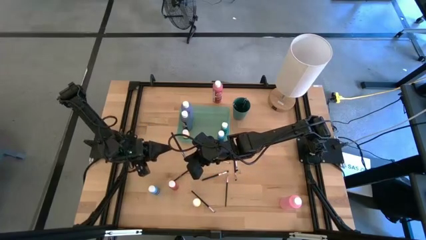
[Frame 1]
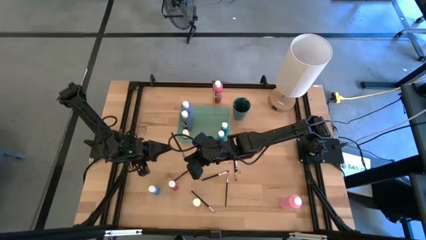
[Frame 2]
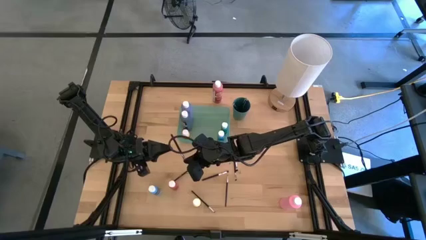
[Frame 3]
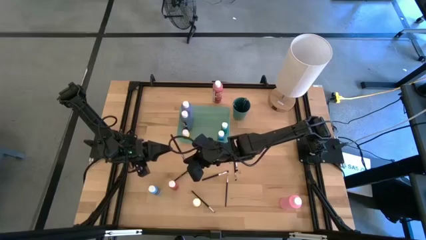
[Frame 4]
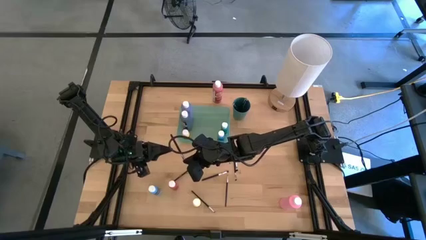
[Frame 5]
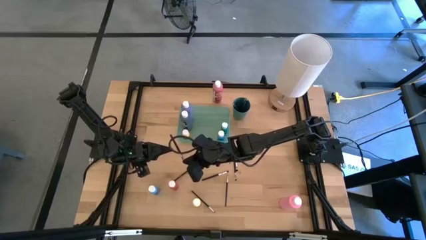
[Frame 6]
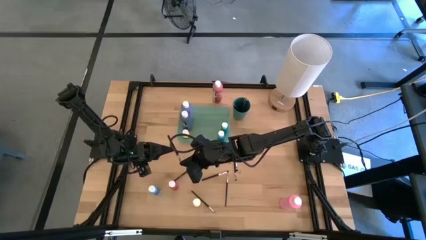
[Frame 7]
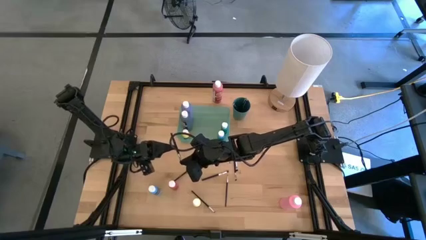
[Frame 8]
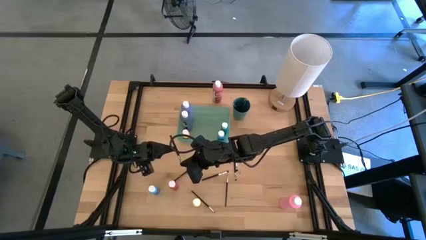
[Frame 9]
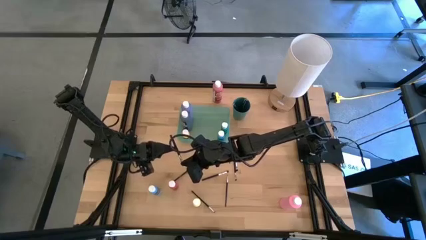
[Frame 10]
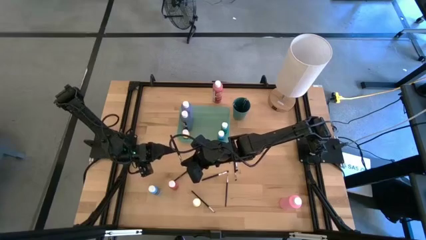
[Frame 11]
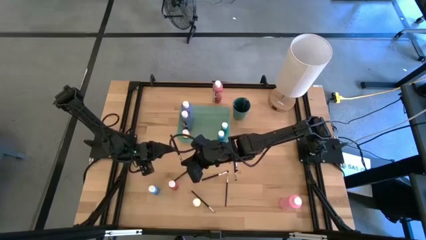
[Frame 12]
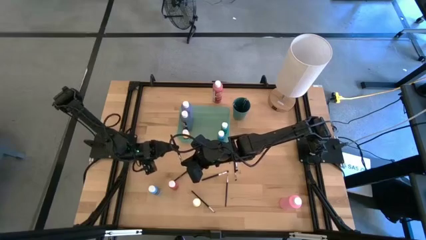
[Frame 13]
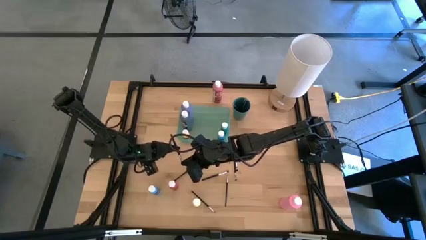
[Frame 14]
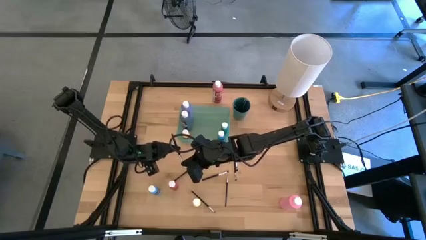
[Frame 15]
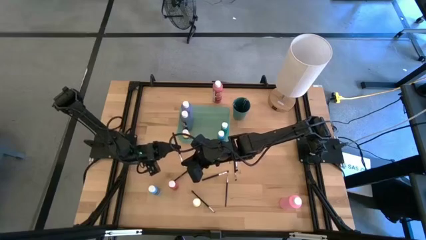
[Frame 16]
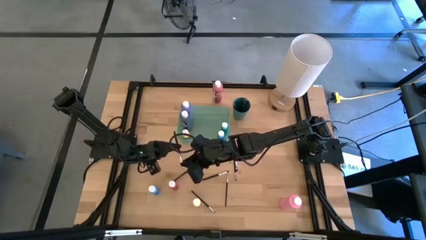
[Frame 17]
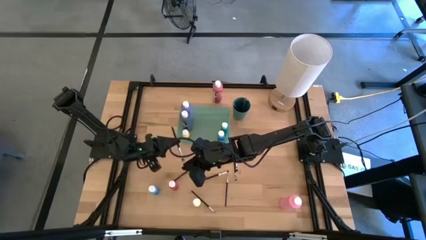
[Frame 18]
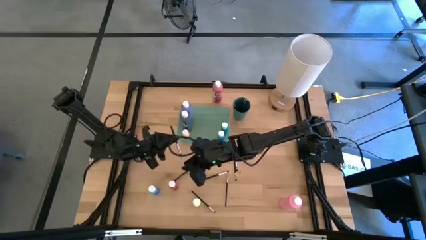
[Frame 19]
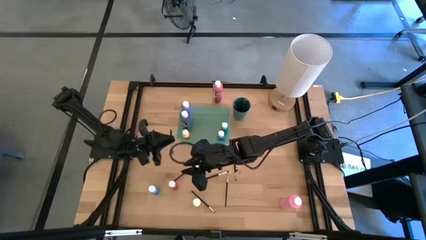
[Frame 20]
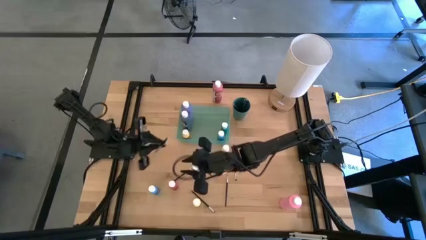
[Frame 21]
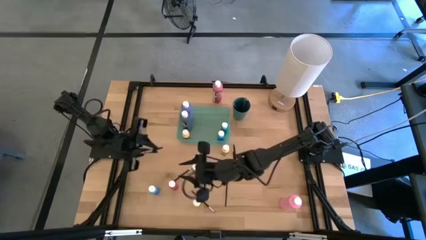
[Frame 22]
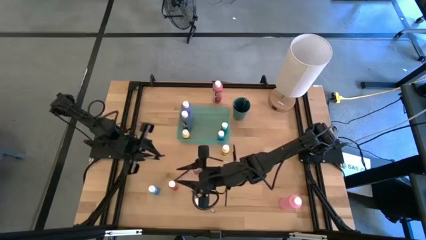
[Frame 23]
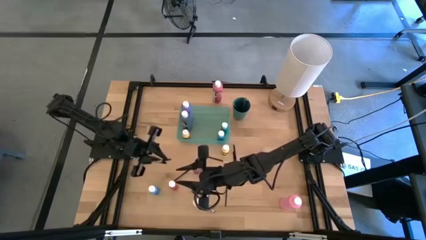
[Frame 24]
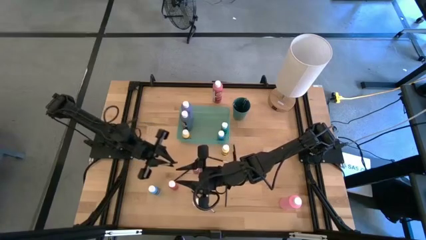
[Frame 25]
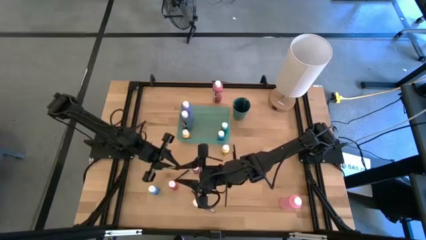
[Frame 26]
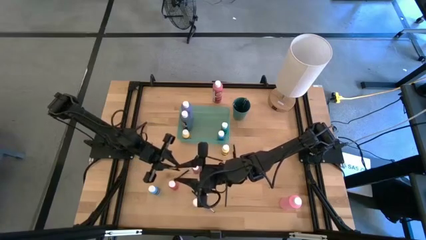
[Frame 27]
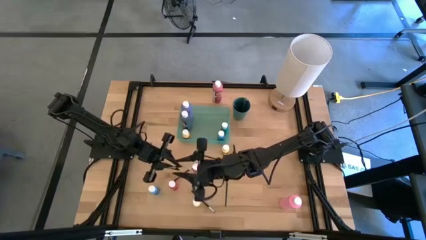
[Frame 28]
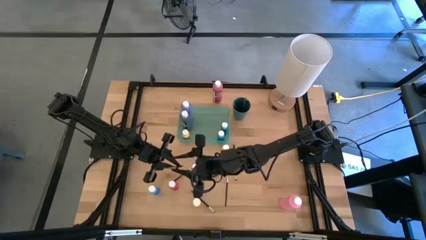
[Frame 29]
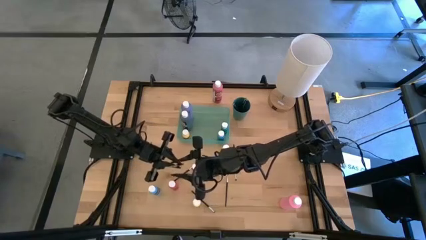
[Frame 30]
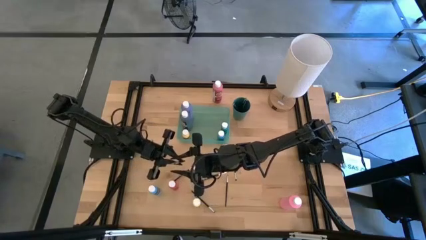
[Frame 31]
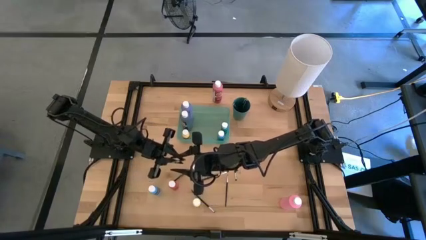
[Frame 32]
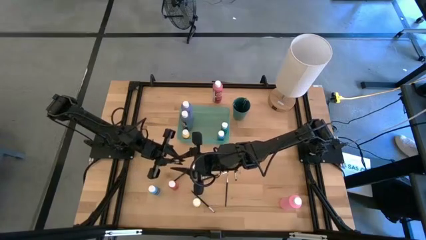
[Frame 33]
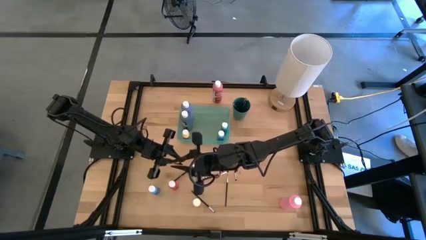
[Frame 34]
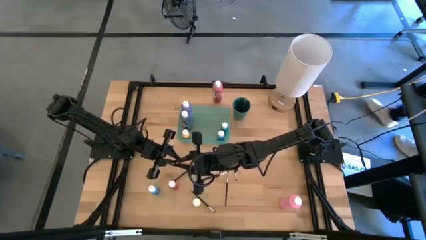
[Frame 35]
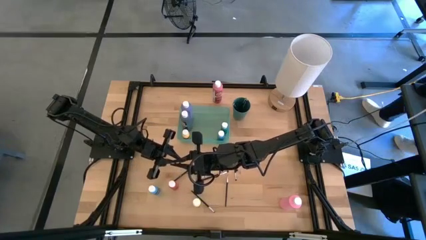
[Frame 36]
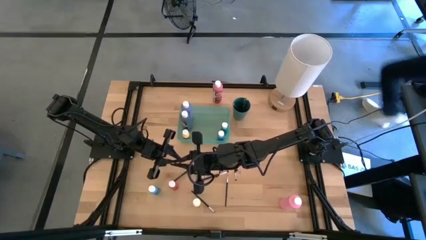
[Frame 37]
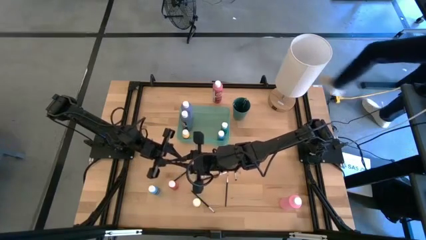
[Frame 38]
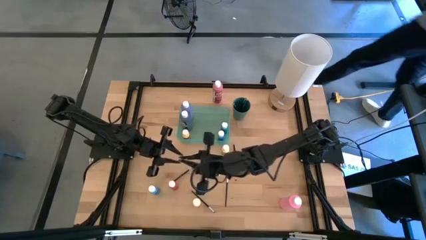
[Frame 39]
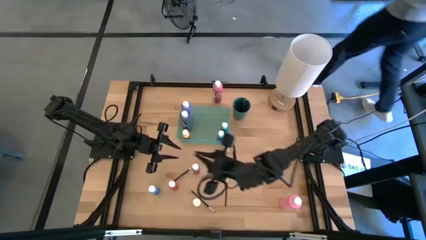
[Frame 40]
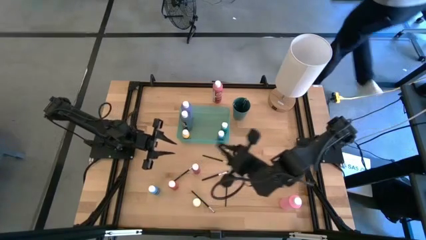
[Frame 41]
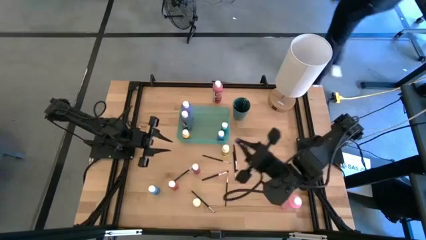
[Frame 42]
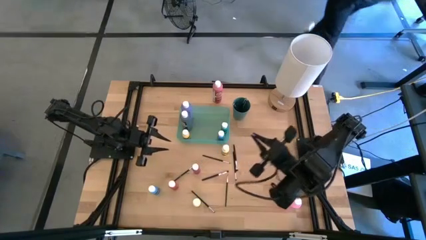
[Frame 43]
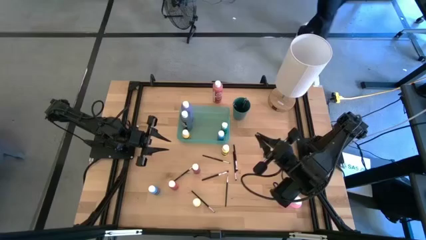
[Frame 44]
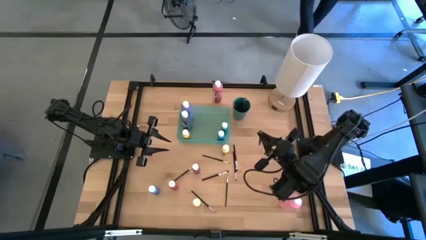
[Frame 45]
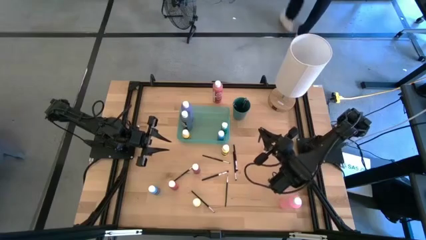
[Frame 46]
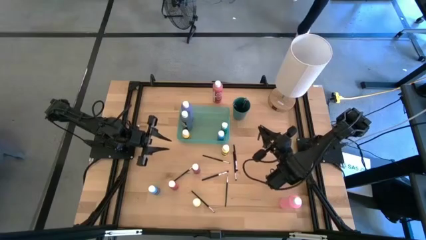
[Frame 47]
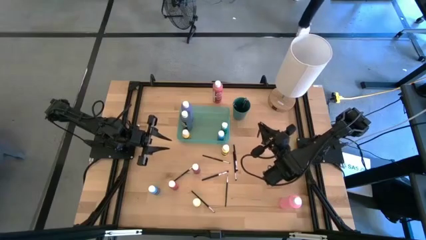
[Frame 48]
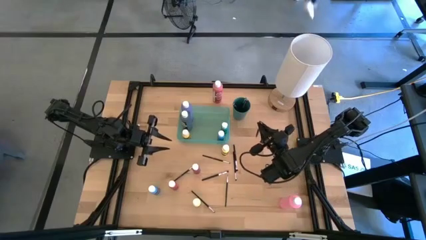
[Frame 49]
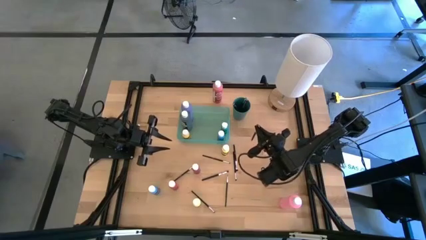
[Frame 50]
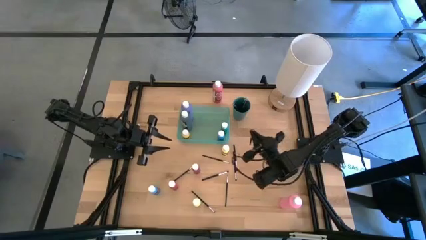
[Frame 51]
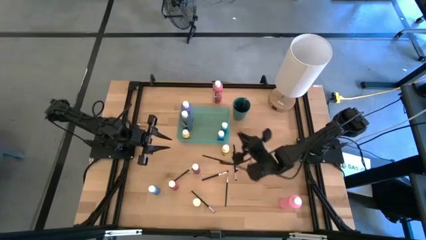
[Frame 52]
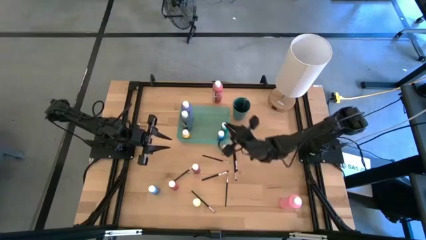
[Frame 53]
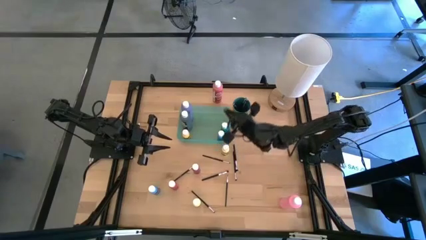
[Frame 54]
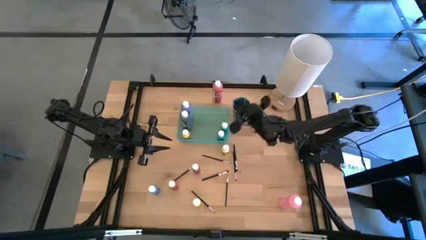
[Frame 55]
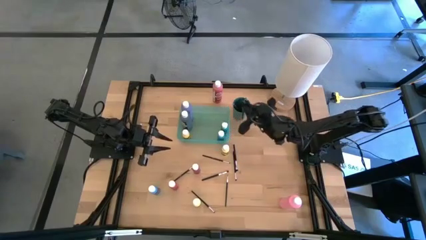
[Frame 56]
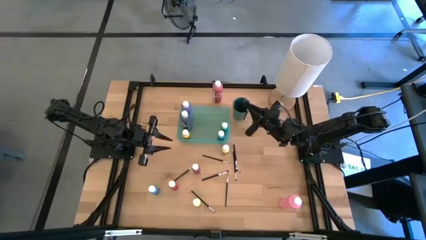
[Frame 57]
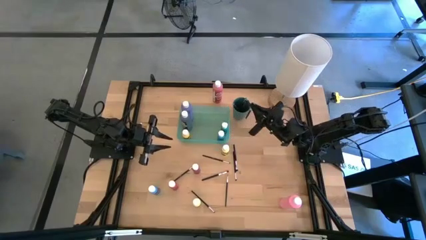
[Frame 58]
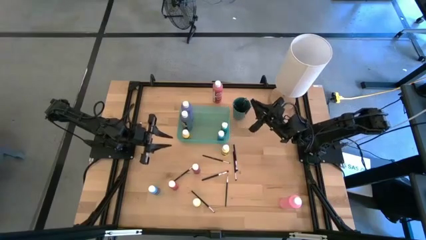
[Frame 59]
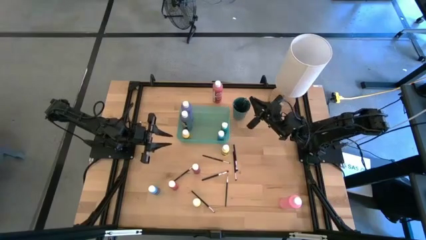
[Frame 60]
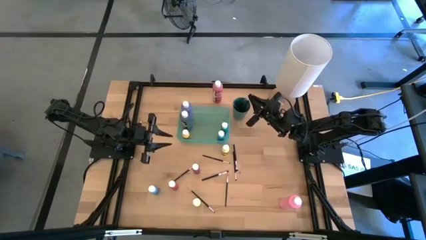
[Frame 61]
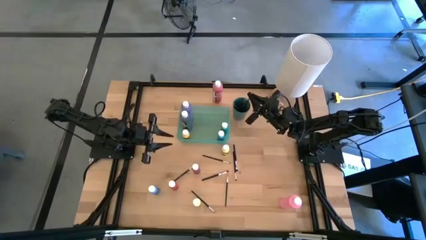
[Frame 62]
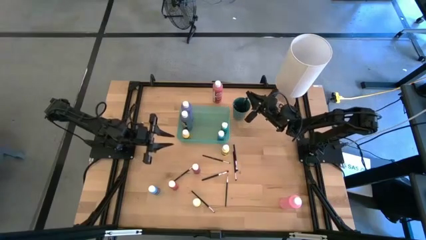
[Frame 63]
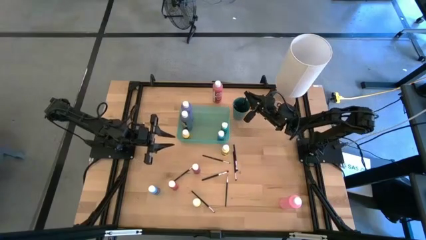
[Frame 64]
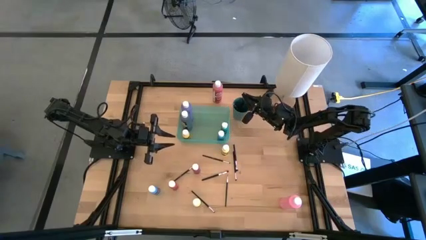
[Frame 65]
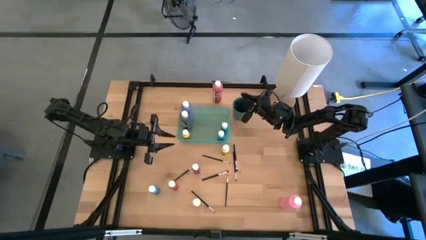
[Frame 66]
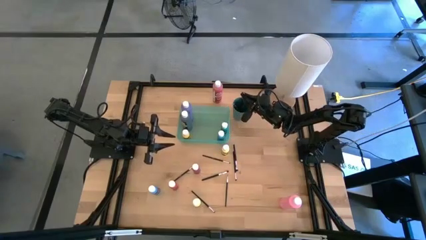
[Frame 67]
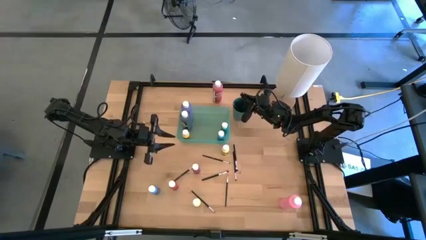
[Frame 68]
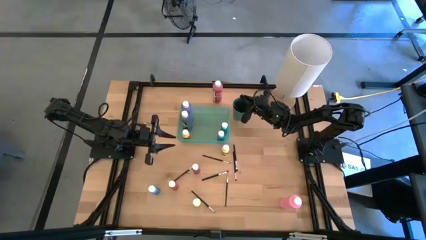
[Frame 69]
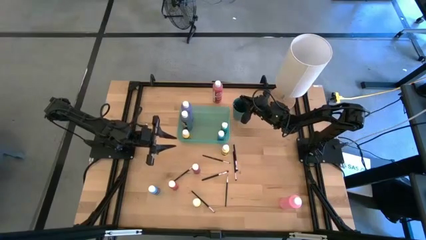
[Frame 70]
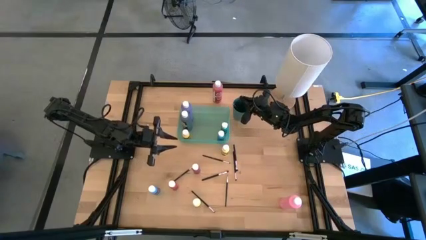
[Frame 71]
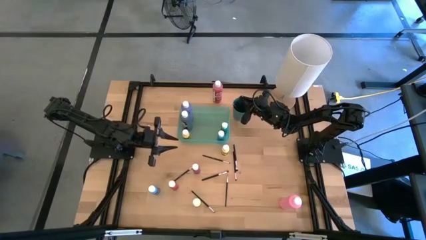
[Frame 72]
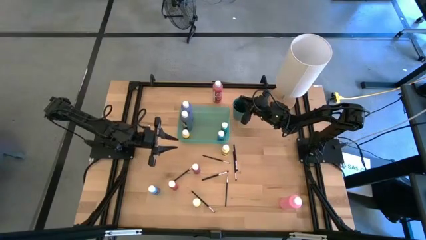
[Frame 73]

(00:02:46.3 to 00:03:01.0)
Task: Pick & Place Paint Supplies
Put the black paint brush into the dark green cup
